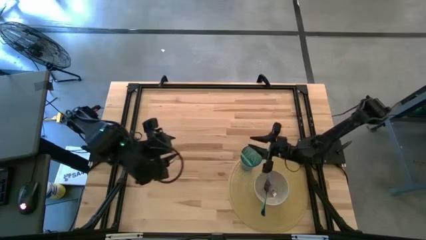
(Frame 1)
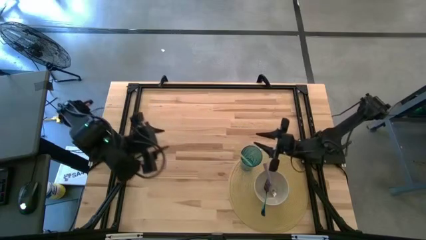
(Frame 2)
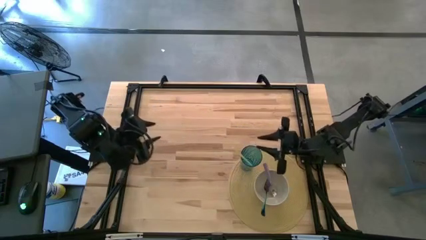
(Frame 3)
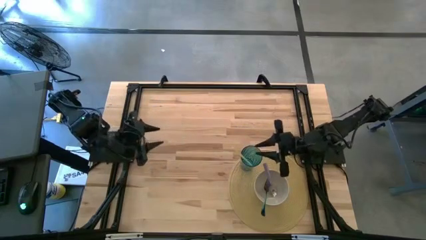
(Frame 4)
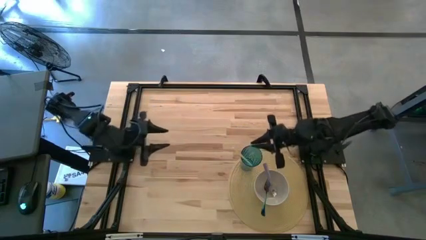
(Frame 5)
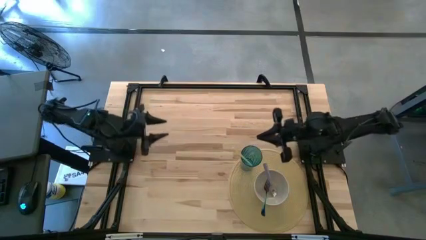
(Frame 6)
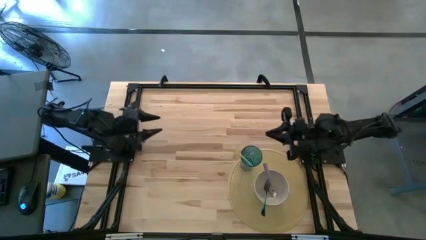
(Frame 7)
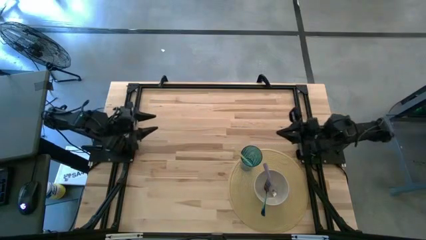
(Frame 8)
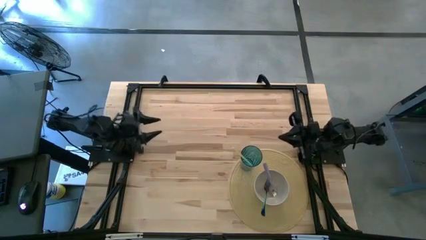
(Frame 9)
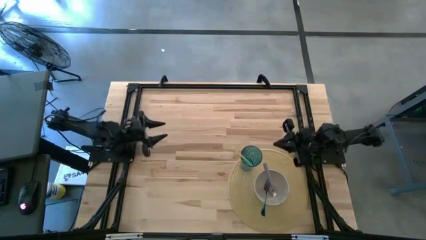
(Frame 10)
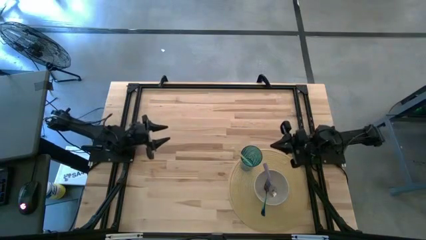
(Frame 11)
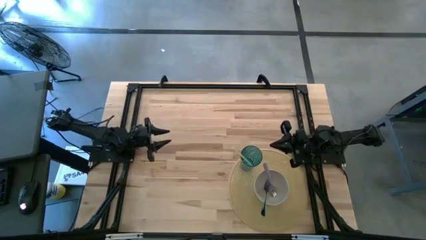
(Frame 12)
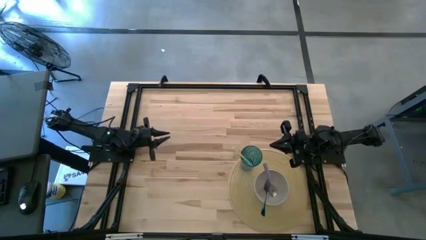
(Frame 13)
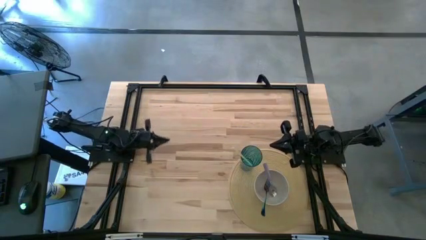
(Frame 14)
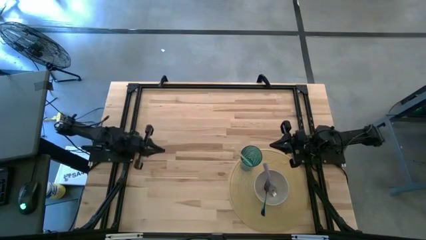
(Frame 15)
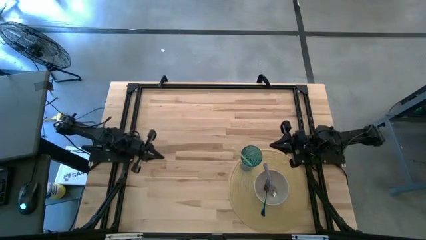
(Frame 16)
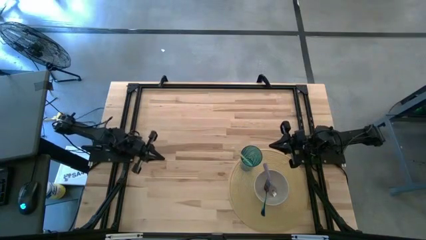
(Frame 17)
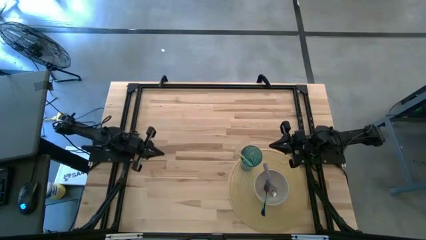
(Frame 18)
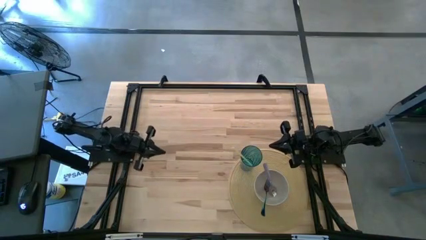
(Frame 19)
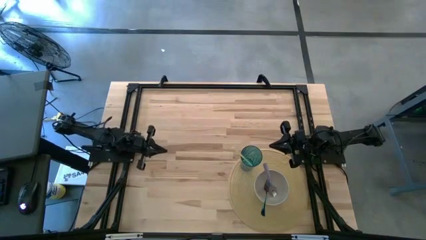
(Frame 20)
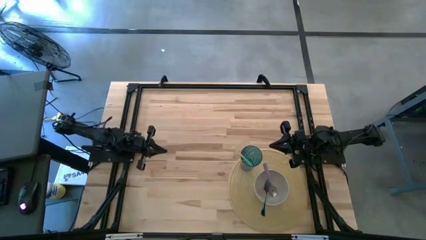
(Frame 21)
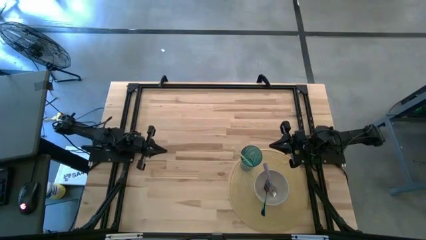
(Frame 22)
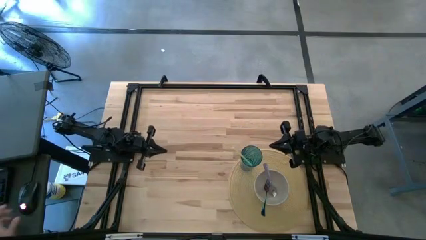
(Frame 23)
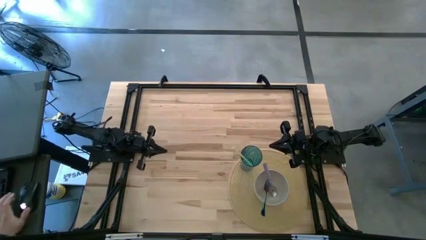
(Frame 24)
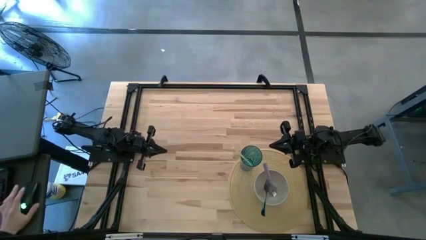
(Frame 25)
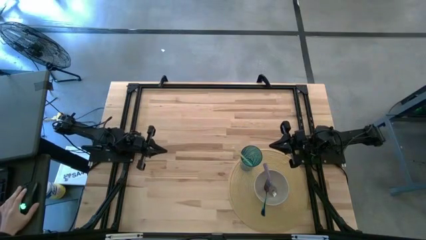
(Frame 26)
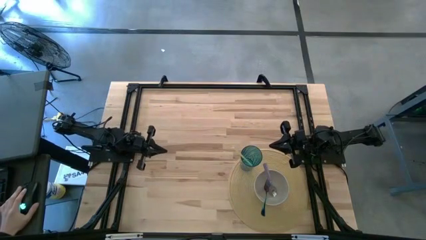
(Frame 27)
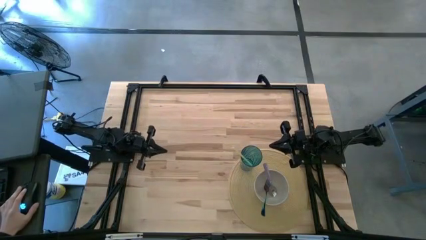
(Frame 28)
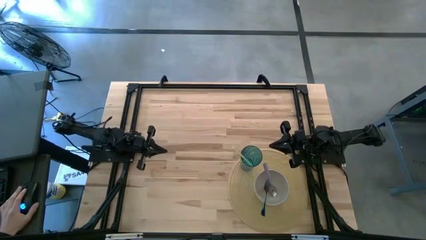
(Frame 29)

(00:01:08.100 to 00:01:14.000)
Task: Pick & Place Utensil
Return to Home Position

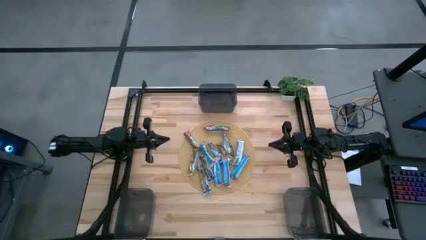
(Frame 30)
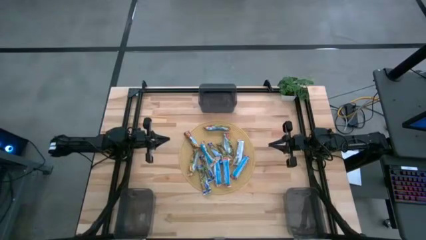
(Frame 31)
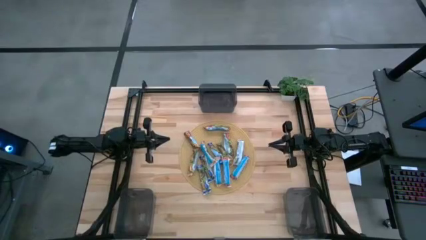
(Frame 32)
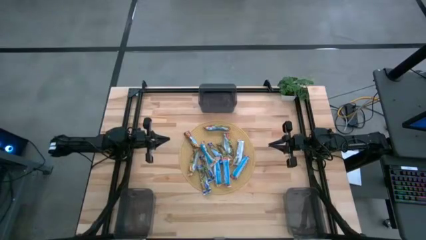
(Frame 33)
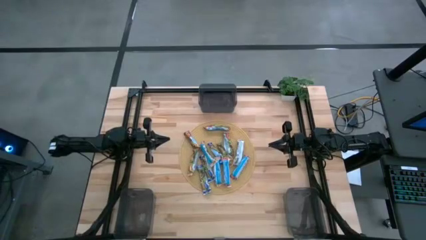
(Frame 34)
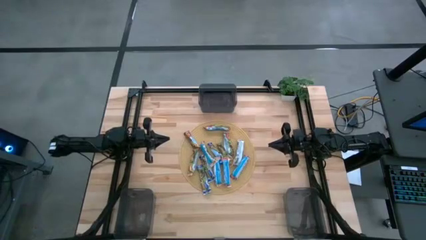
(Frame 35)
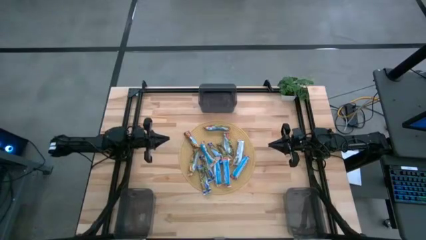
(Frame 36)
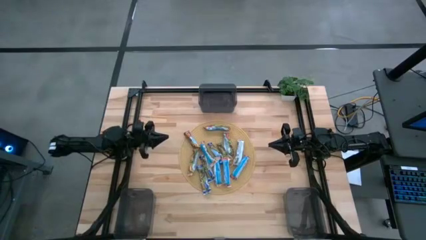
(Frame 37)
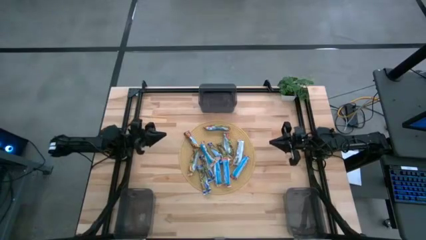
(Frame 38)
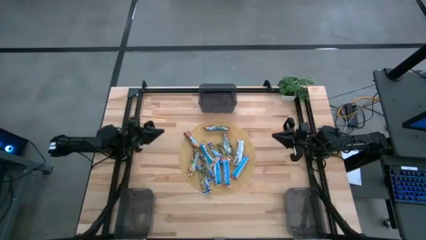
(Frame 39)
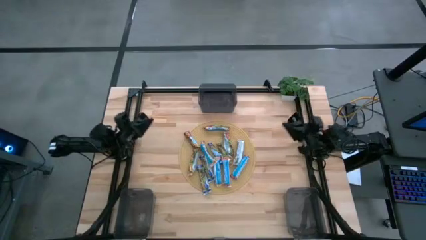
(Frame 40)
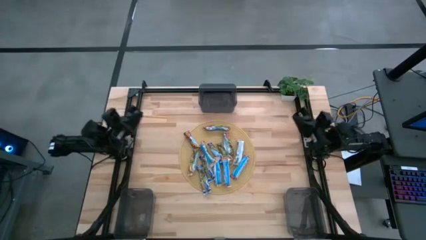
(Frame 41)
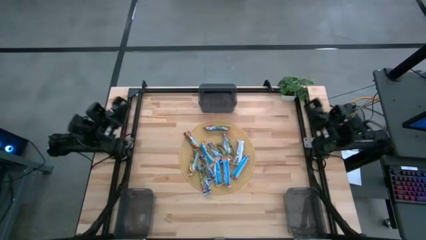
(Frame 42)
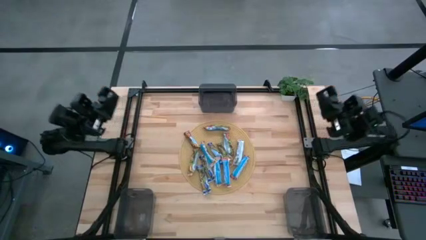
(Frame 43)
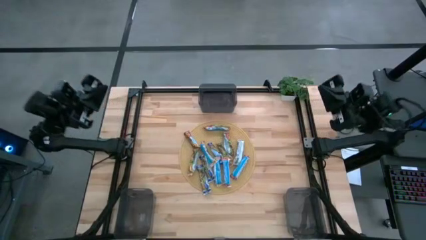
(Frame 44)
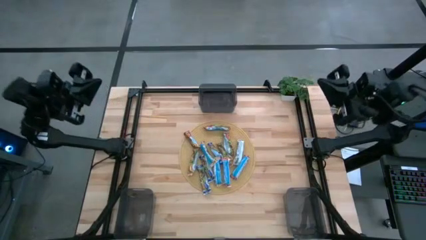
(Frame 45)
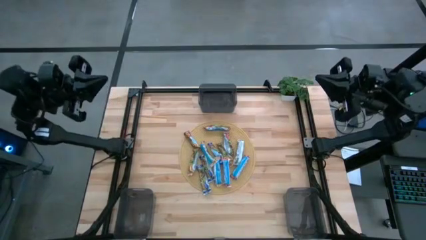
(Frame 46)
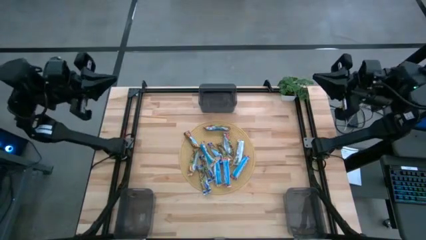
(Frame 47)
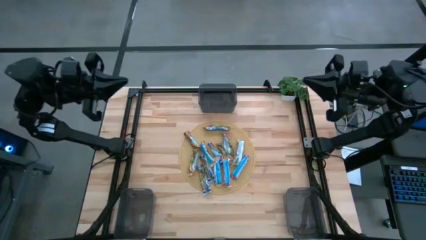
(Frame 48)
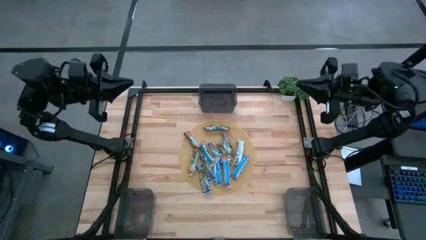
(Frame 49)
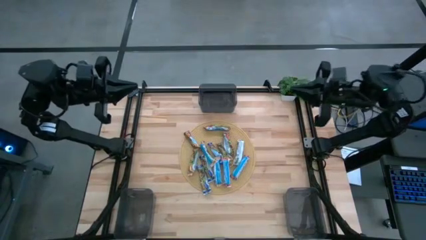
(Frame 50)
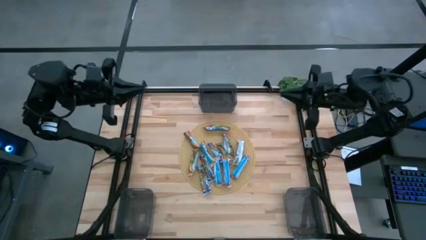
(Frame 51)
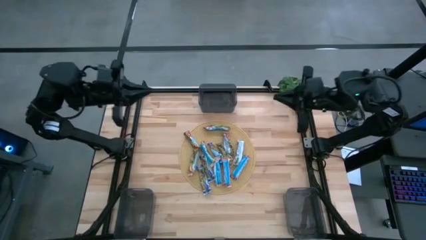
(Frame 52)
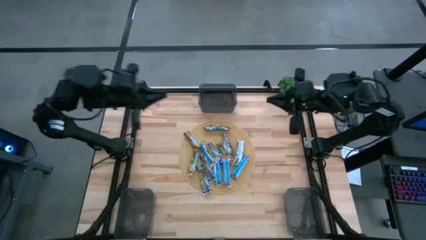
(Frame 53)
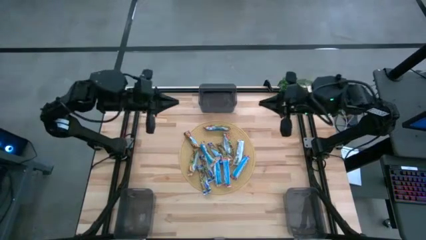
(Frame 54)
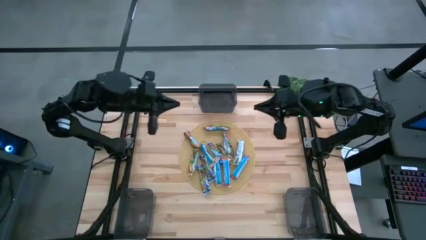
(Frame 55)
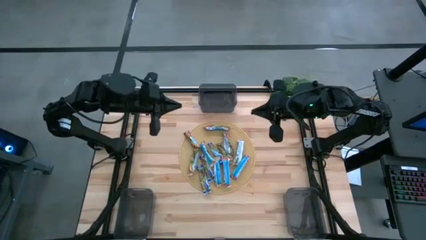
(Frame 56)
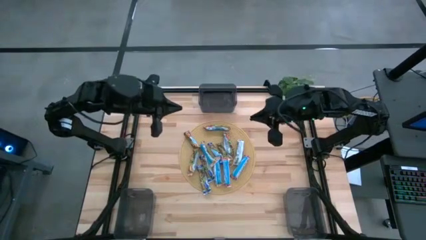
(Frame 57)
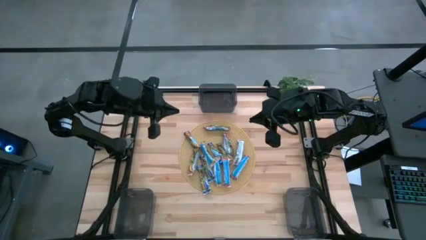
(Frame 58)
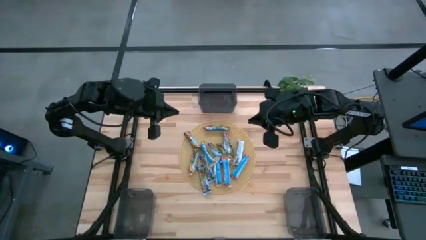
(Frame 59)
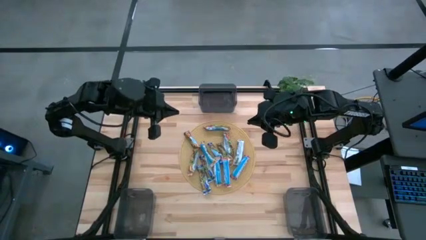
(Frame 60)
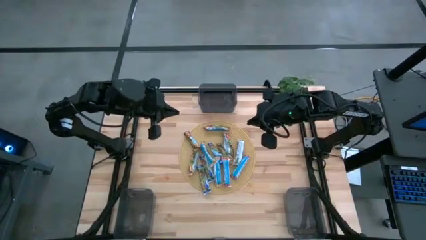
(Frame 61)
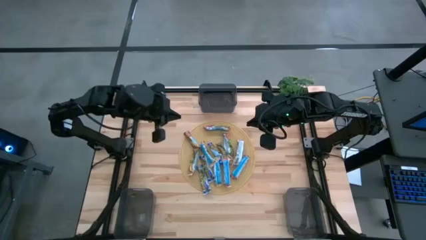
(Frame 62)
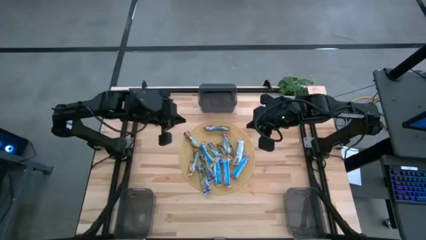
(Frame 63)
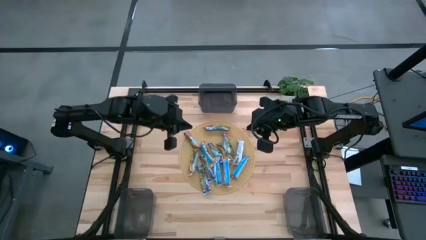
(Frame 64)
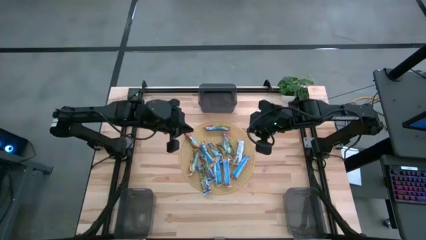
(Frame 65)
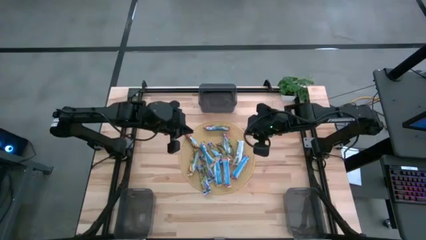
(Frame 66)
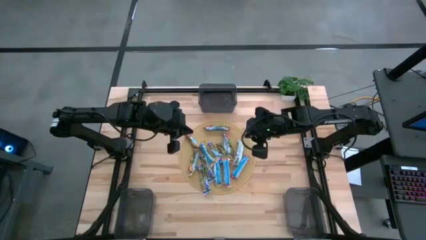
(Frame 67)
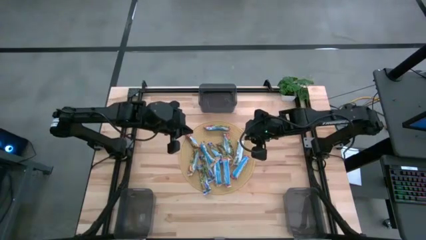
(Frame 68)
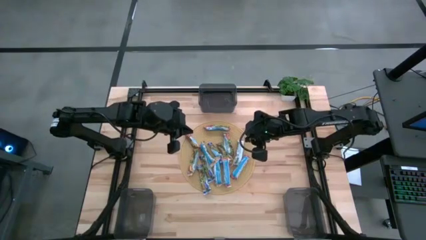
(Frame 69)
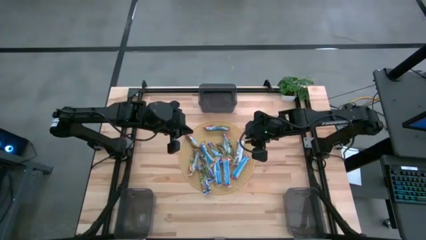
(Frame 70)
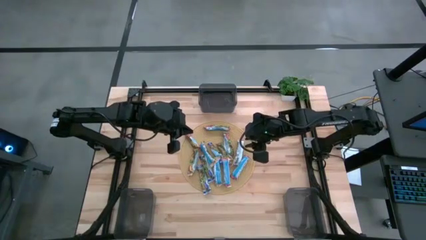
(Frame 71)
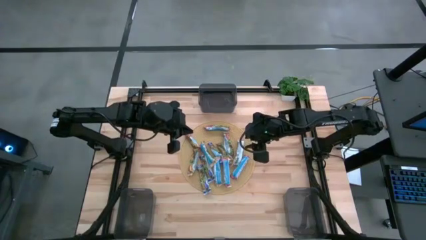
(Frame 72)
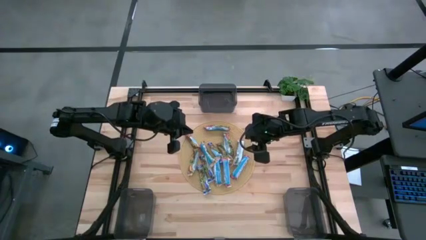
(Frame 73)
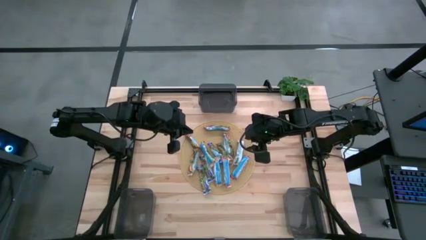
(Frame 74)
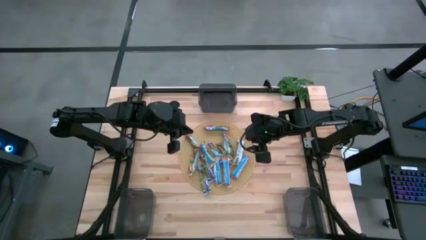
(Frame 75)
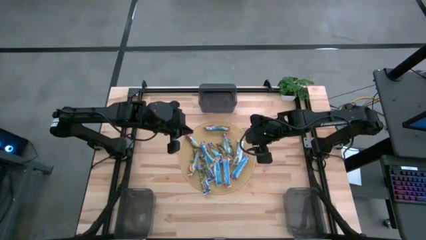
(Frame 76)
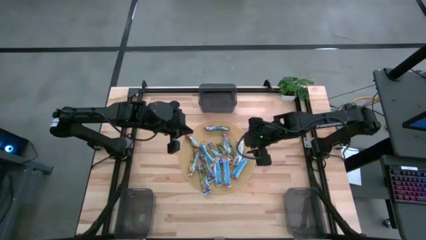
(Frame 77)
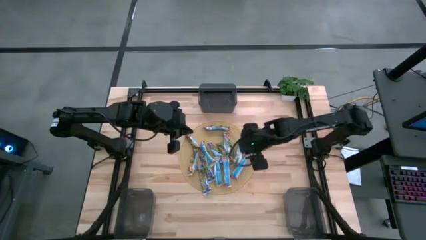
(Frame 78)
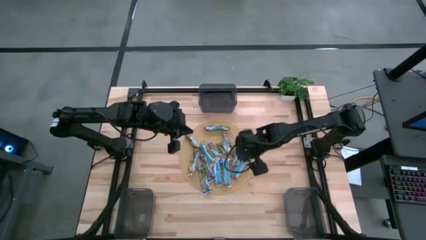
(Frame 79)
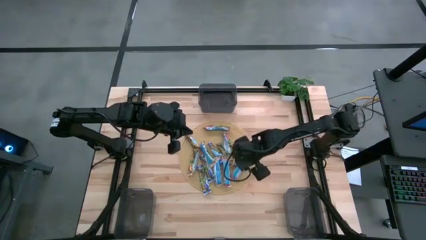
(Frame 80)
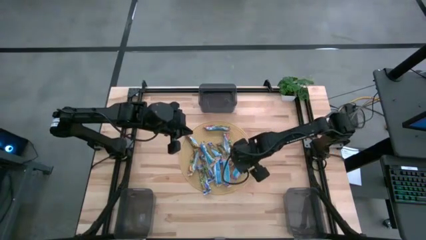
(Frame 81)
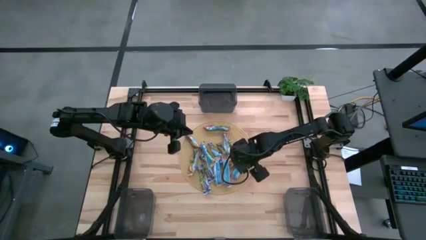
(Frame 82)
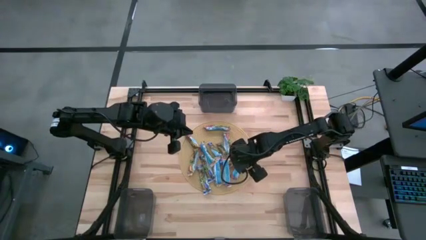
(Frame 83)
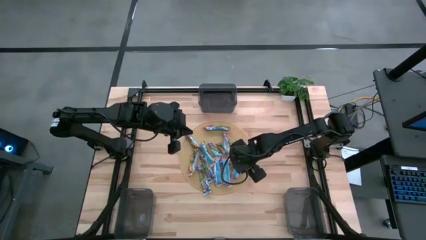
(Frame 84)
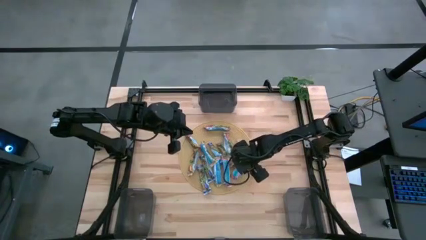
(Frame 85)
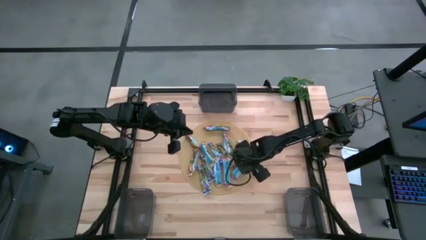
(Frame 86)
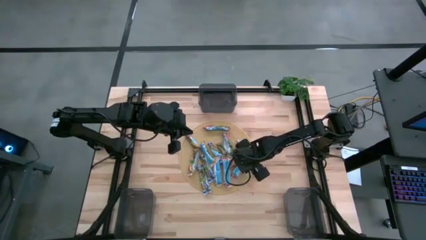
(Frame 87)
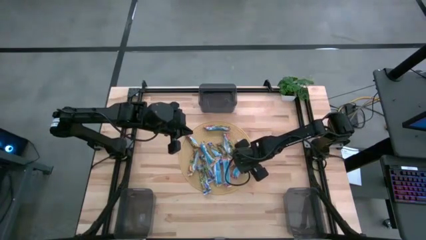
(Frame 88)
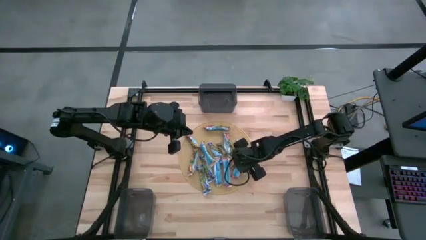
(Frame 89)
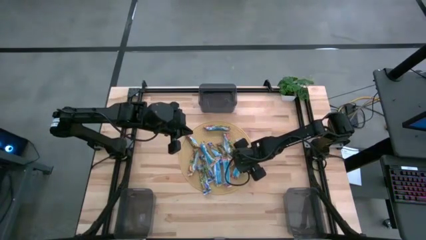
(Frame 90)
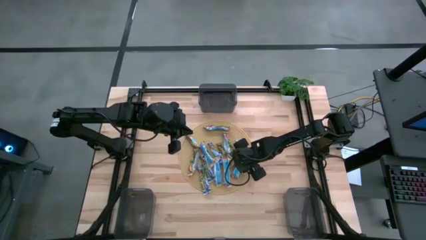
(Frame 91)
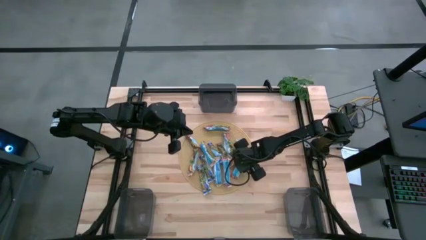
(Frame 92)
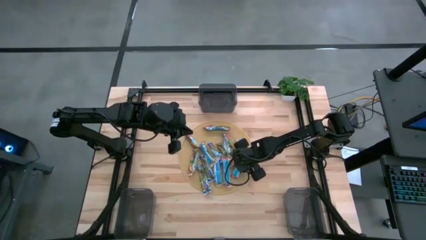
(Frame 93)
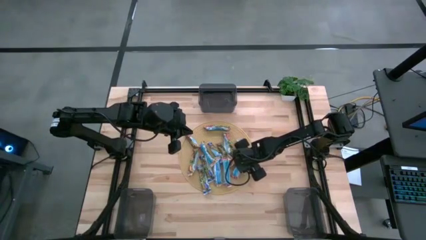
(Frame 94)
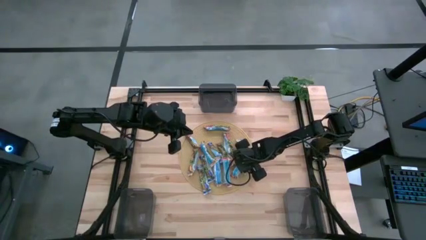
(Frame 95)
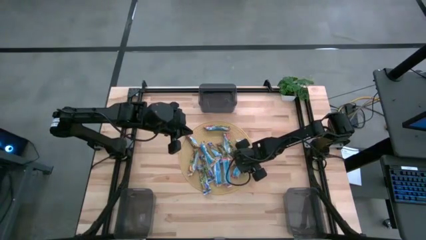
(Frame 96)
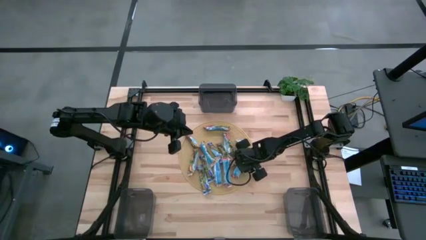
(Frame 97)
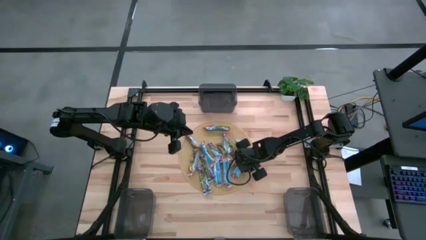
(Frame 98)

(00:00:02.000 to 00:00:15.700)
Task: Pick and place Granola Bars by type
Put the red granola bar into the left black bin
